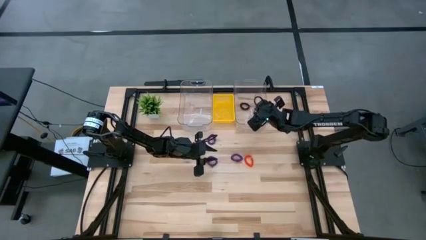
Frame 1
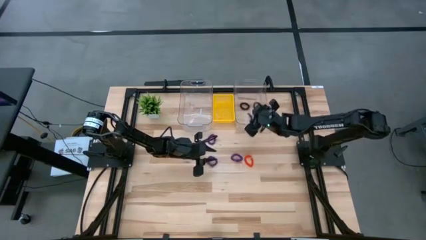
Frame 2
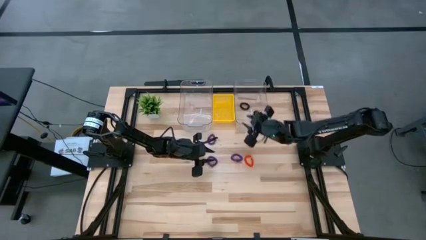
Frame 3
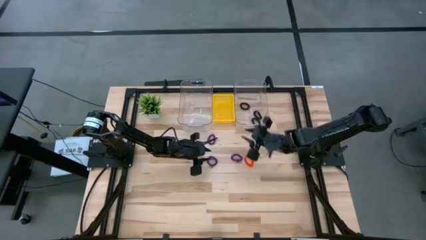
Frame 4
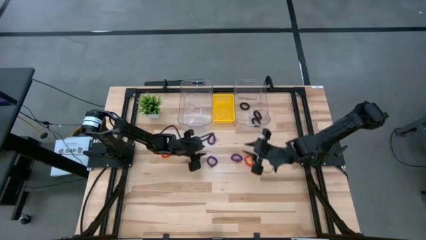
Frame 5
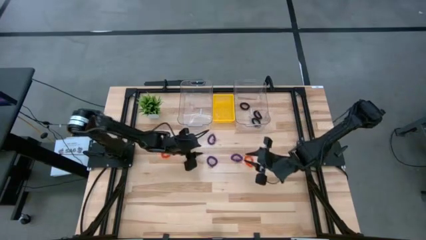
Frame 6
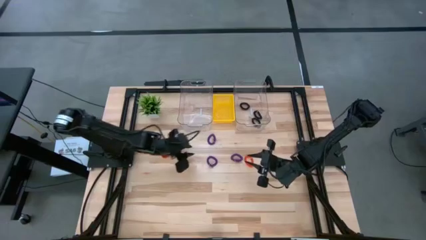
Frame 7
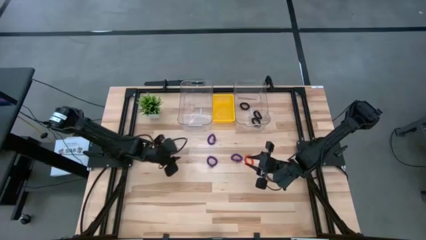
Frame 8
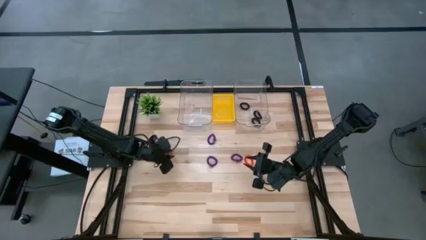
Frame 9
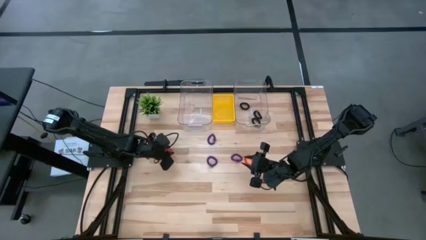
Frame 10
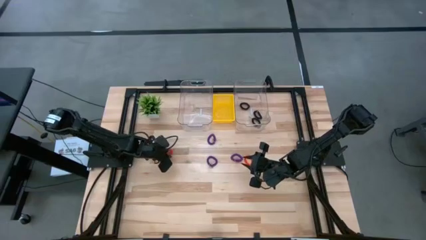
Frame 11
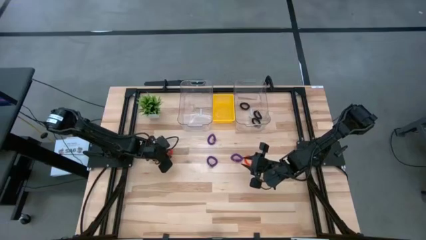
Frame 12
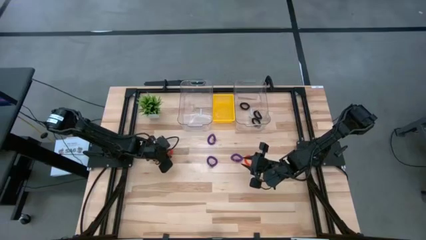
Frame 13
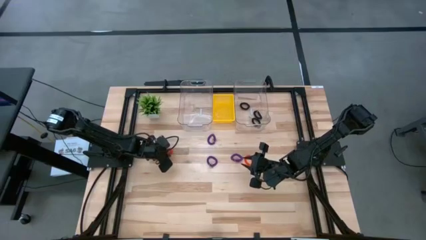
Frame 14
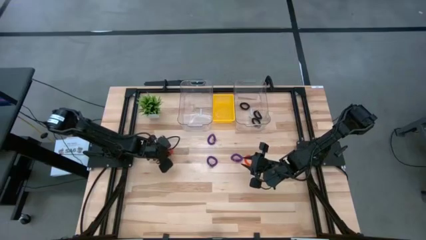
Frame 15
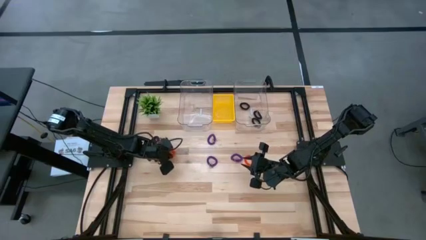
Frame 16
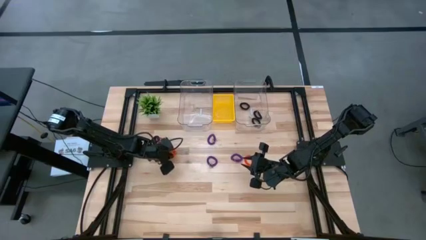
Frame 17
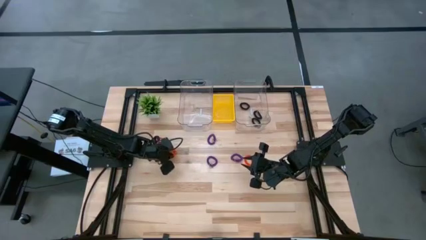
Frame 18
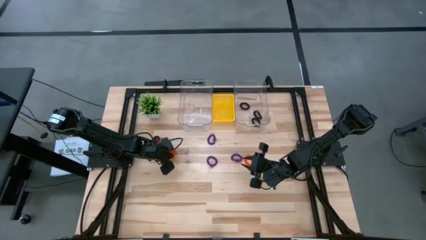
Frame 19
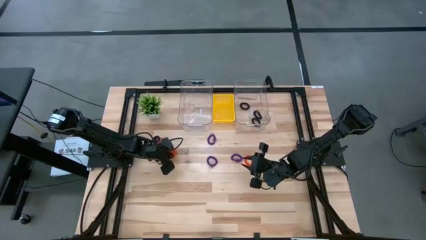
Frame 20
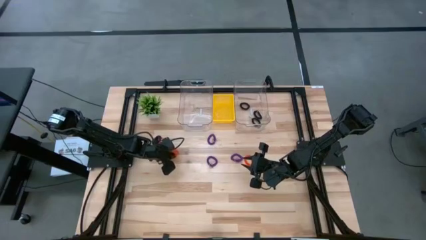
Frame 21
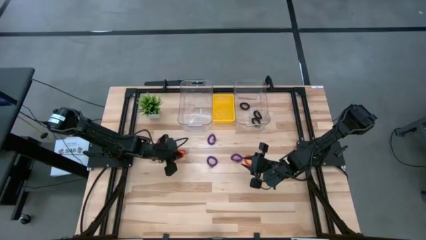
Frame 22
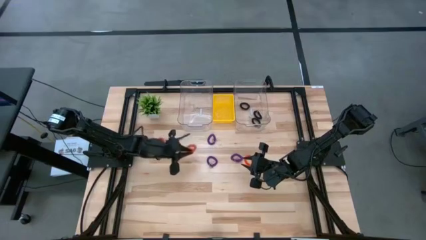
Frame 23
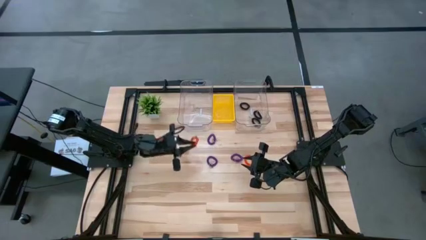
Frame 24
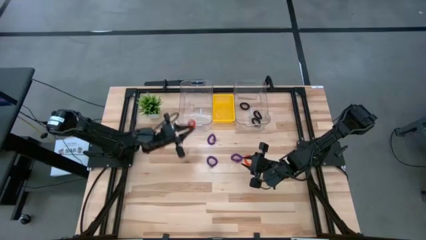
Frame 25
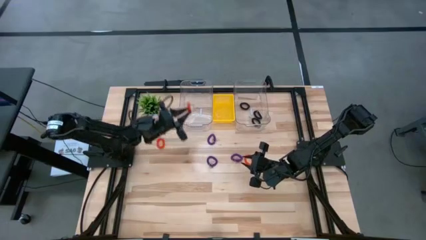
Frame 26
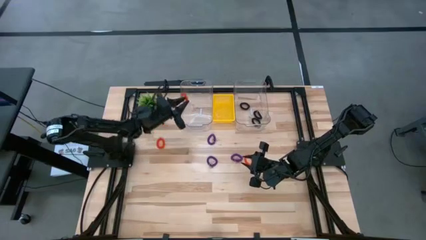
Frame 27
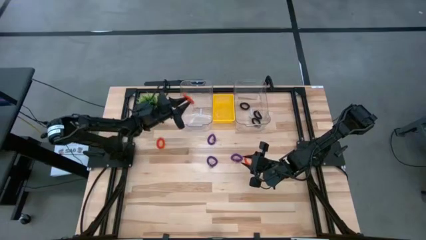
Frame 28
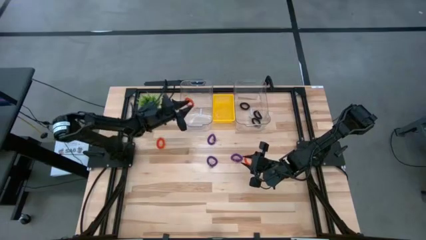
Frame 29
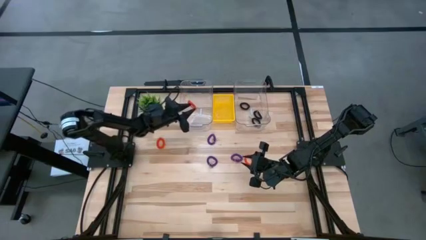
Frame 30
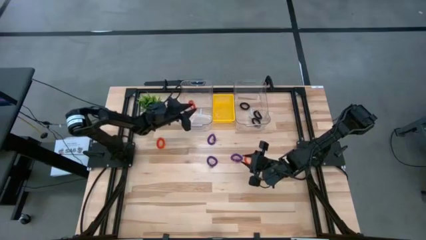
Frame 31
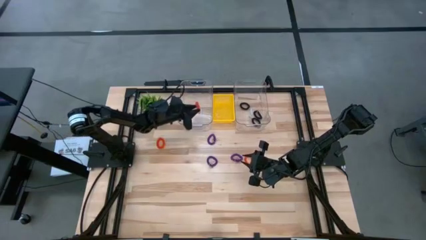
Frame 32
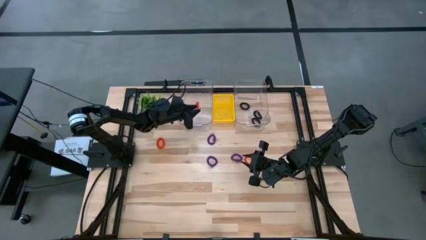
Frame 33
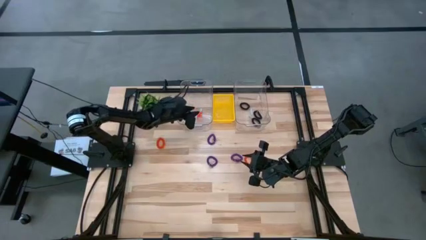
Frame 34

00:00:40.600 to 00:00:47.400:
Task: Sort spring keychains
Put the middle left orange spring keychain into the left transparent bin

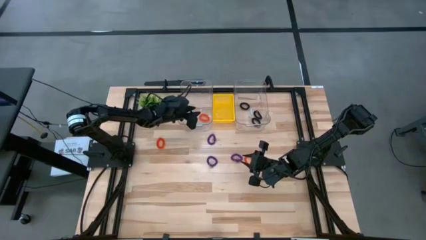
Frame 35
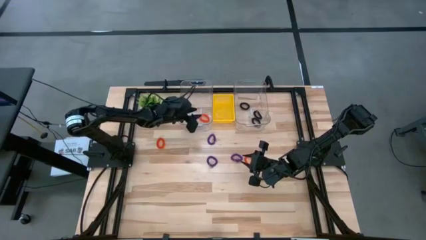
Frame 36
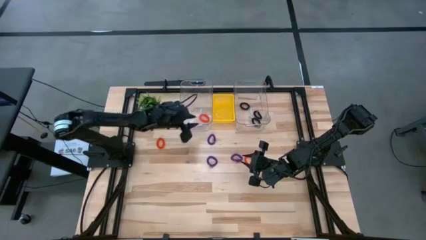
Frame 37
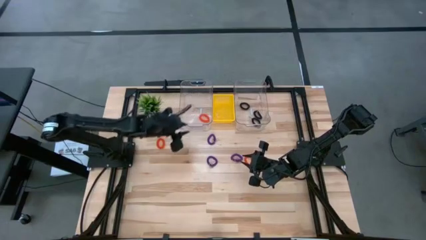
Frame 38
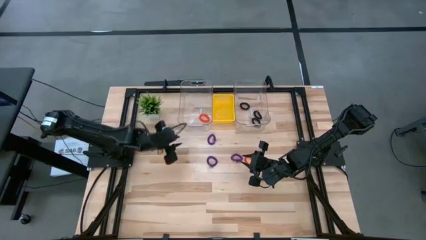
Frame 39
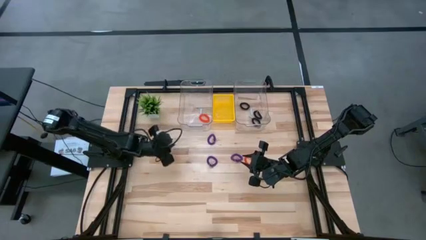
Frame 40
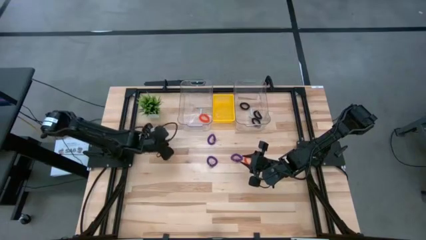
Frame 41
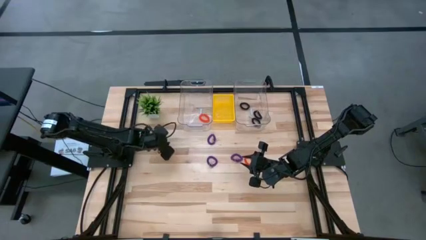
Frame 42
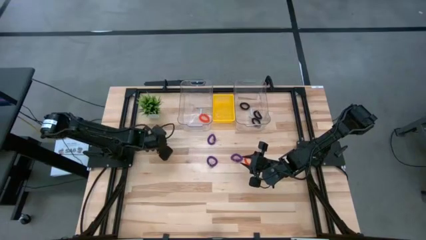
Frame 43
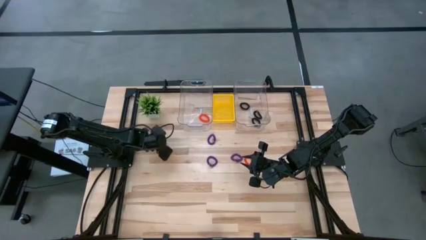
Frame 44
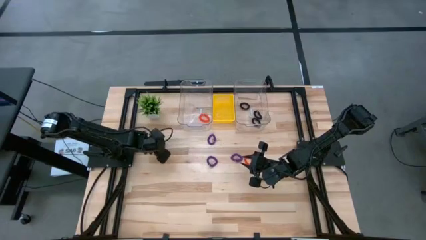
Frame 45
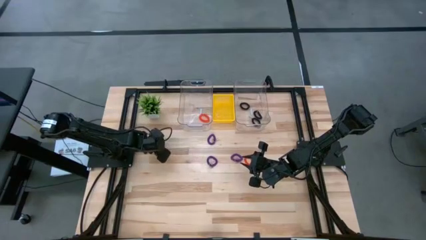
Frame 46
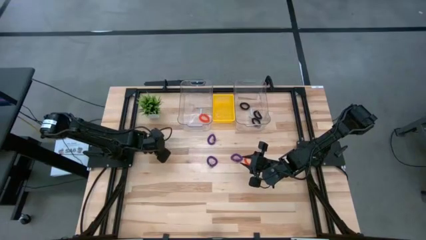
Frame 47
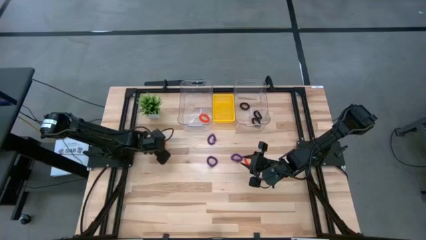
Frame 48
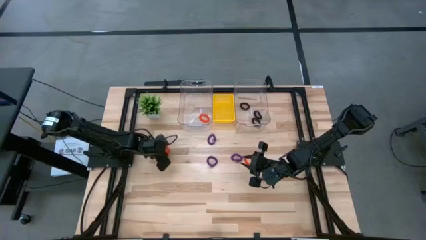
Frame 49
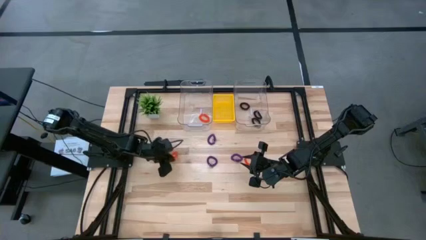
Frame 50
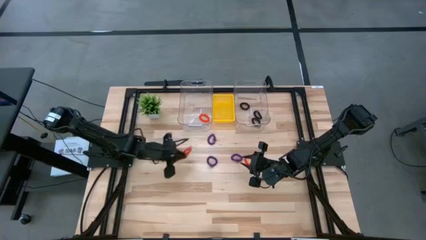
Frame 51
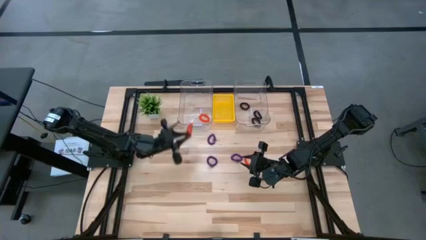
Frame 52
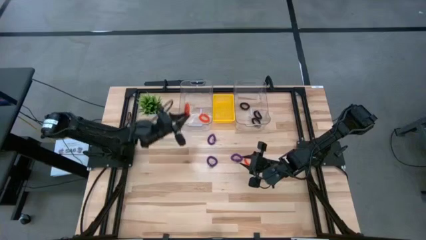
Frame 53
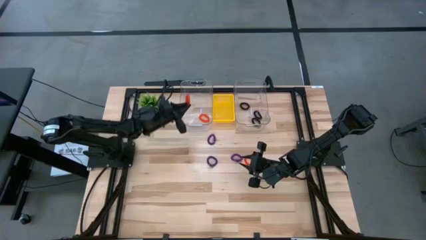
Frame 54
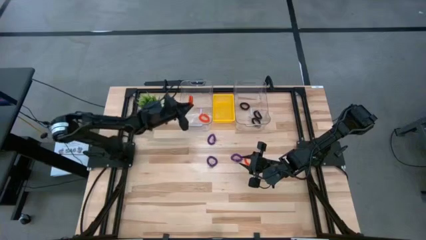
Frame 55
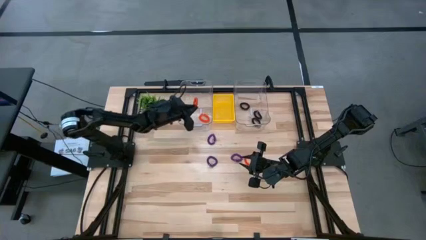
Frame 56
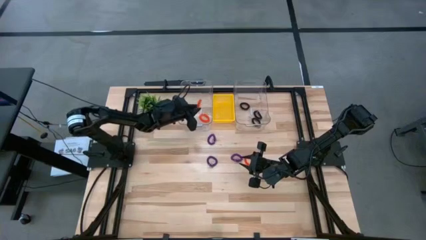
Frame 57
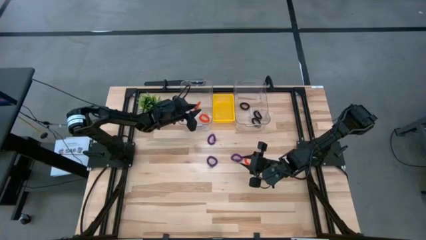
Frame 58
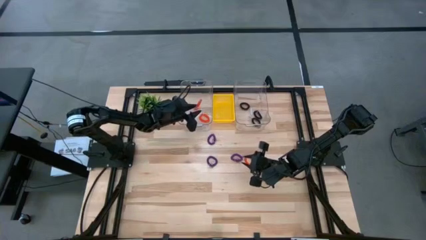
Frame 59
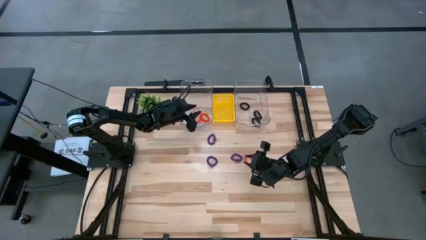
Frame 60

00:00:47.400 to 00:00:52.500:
Put the left orange spring keychain into the left transparent bin
